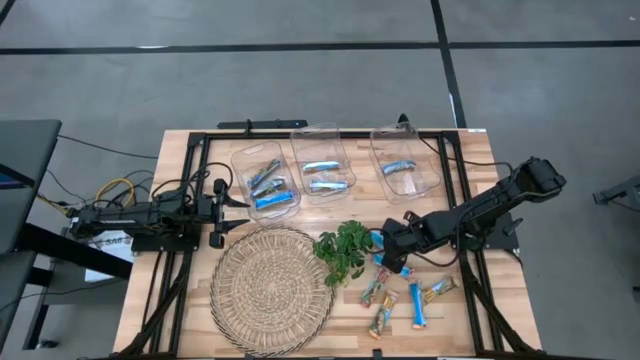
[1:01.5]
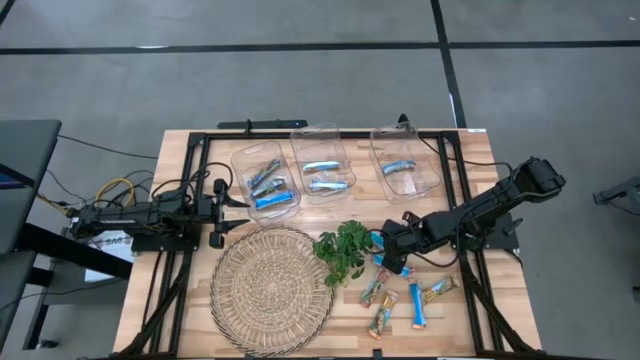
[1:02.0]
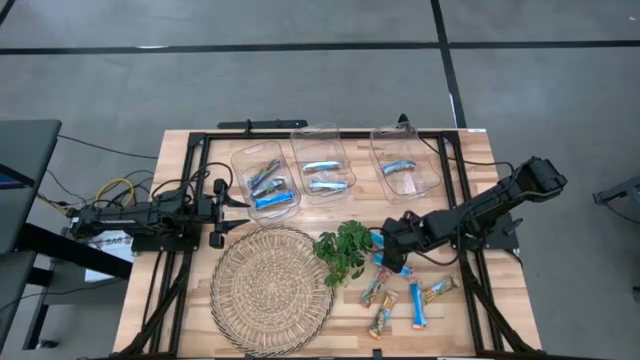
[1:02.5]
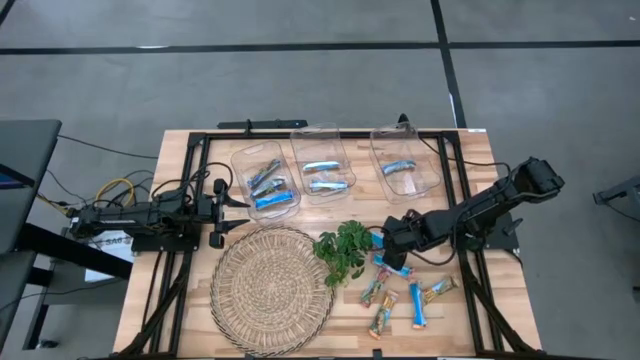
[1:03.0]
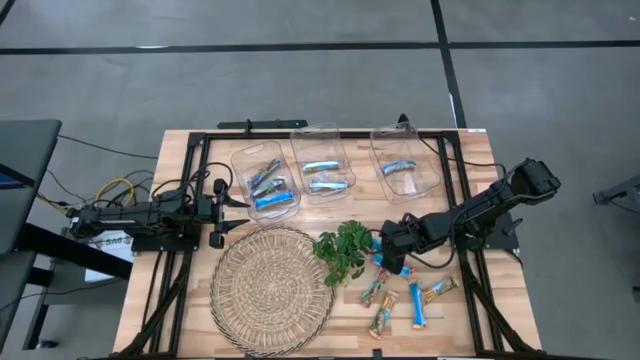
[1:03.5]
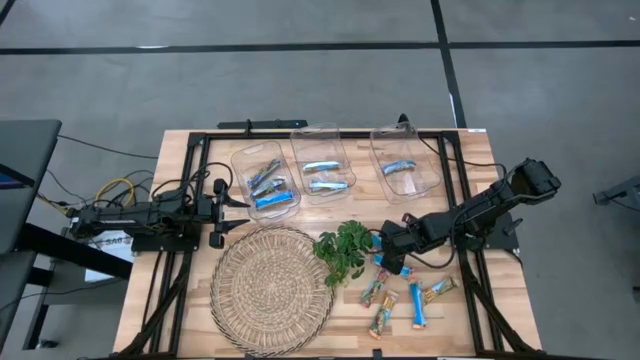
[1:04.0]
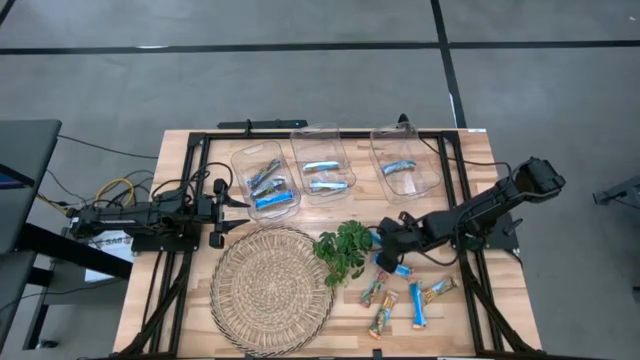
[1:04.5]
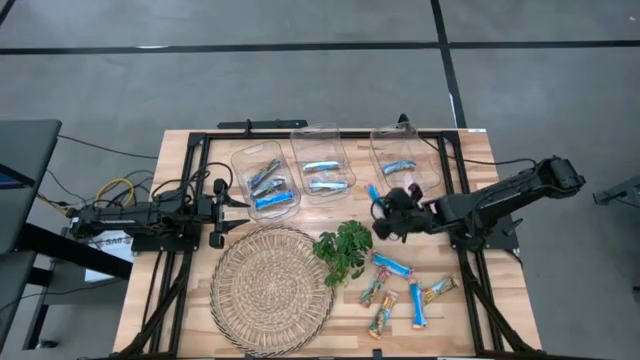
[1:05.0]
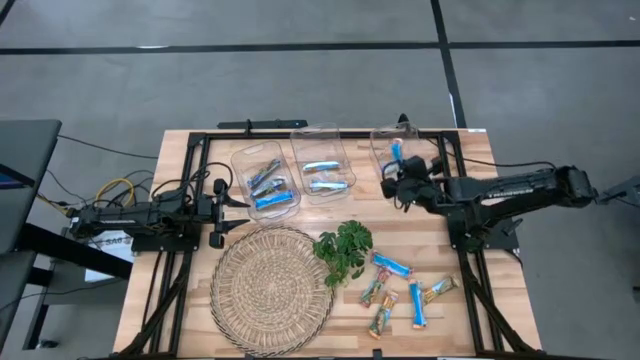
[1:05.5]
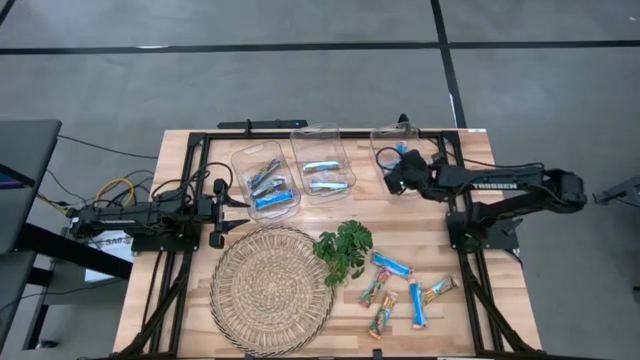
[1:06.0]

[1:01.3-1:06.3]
Task: Pick and place Granola Bars by type
Put the red granola bar into the right transparent bin

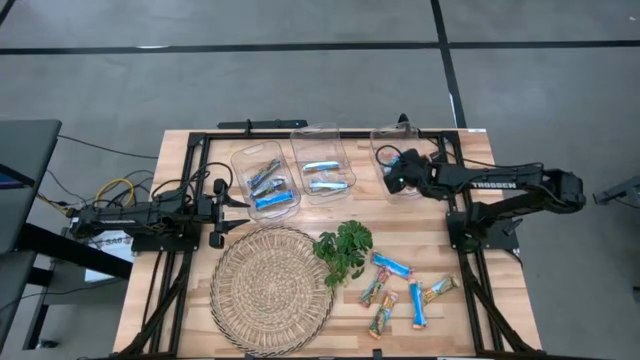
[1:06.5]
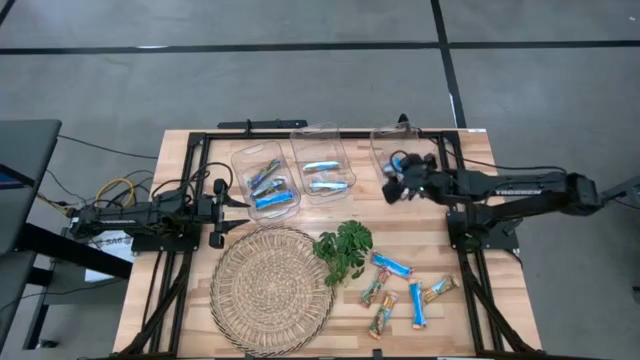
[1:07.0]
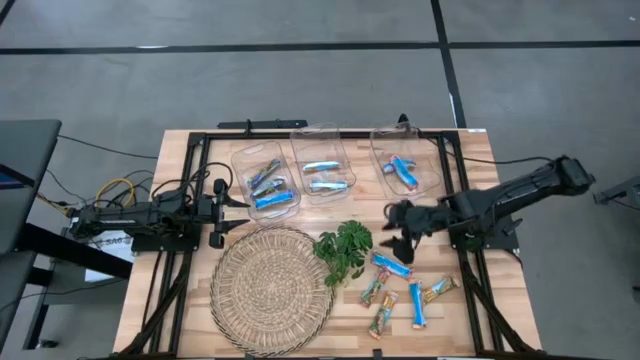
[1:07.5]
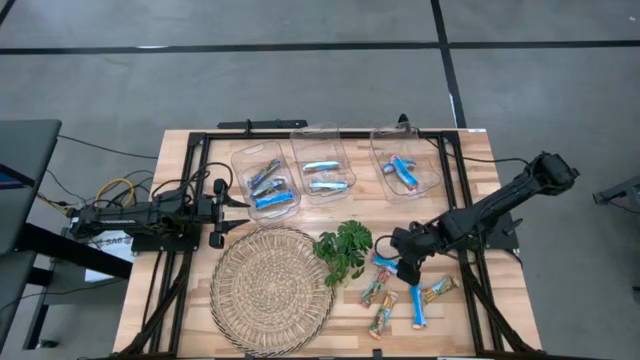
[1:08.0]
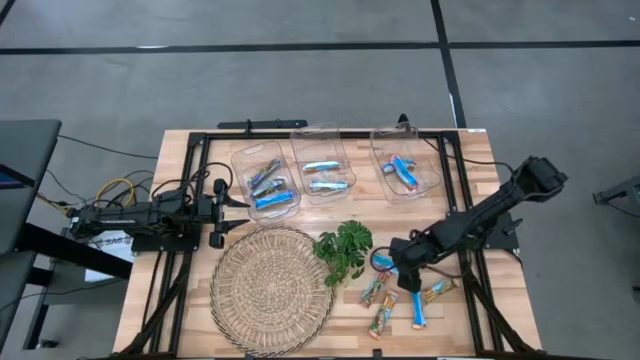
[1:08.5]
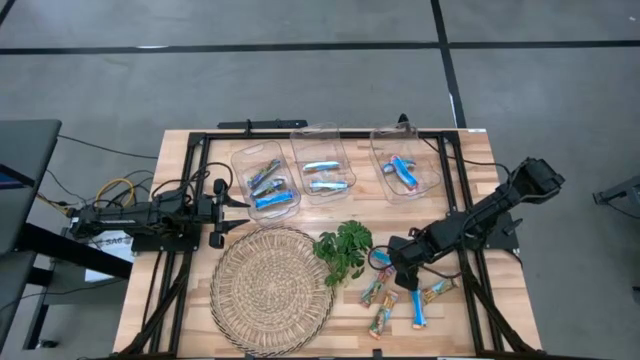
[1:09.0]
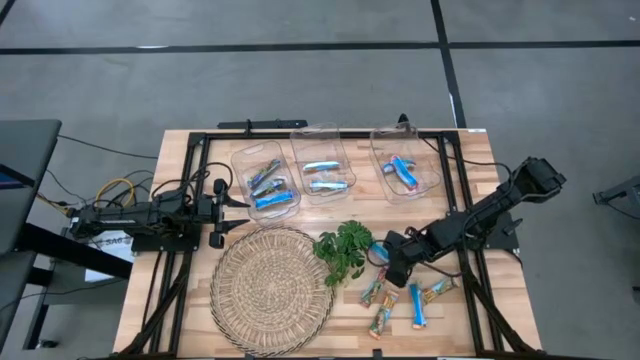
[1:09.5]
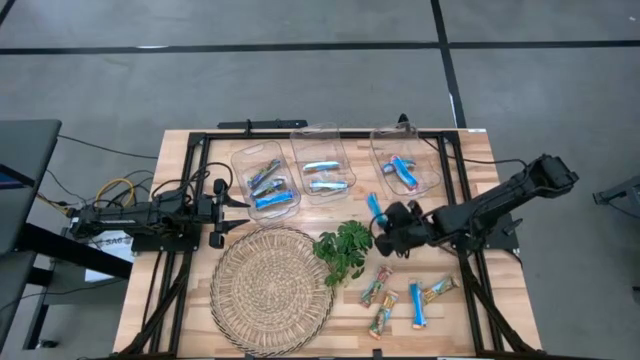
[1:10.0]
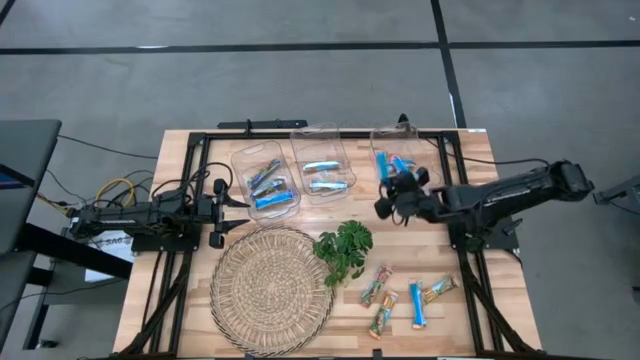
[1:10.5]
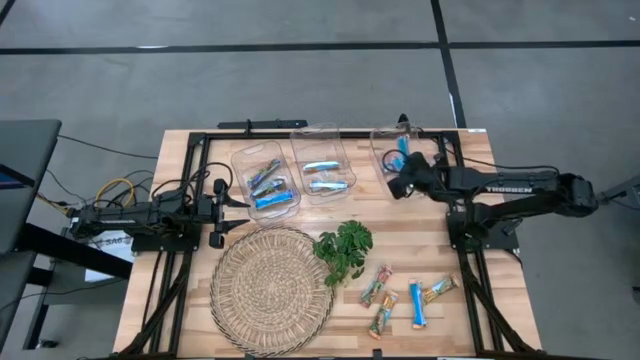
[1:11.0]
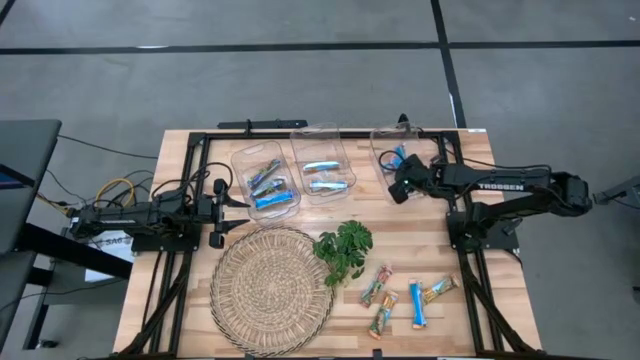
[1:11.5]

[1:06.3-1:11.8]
Put the red granola bar into the right transparent bin

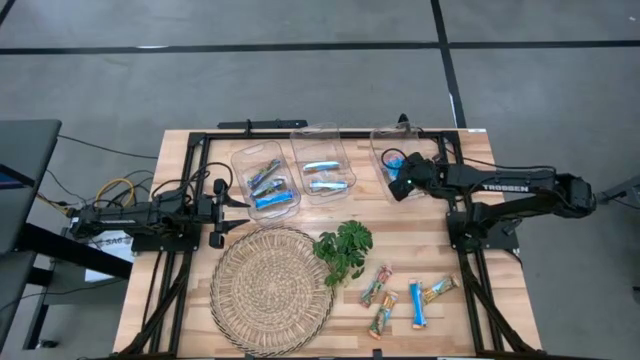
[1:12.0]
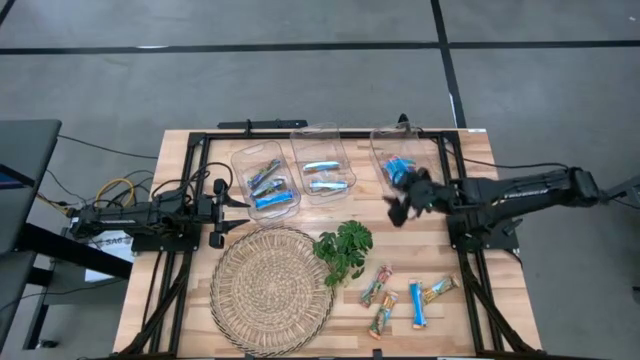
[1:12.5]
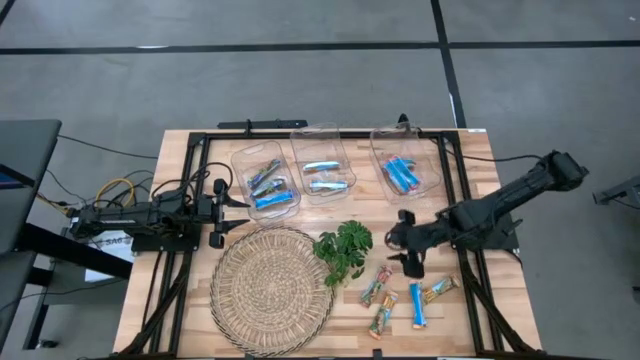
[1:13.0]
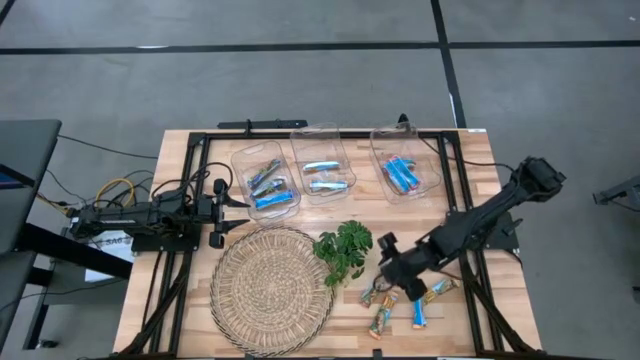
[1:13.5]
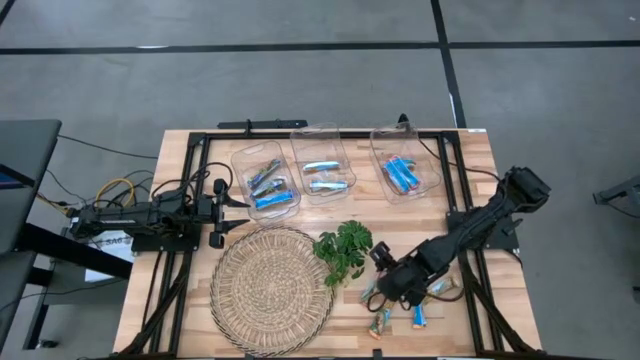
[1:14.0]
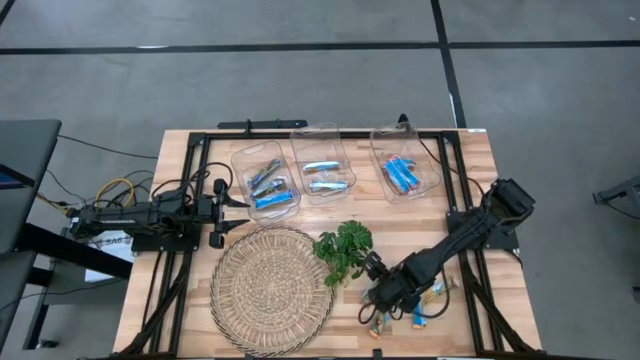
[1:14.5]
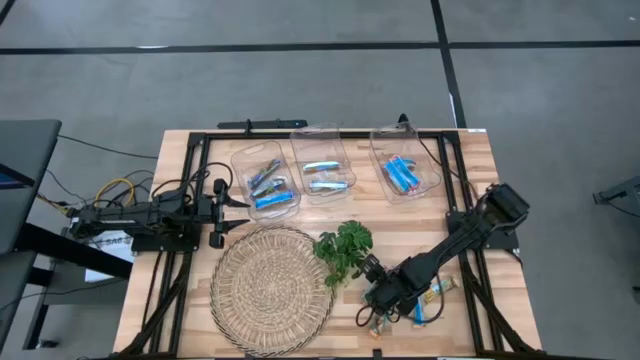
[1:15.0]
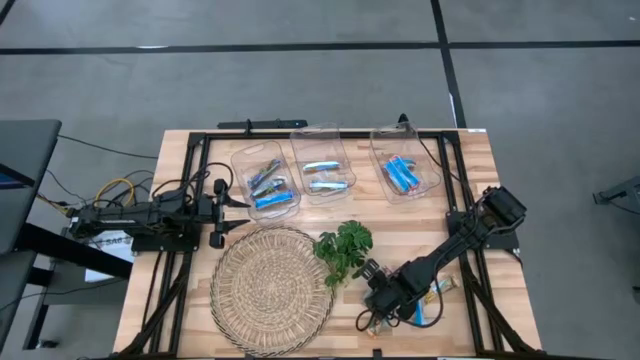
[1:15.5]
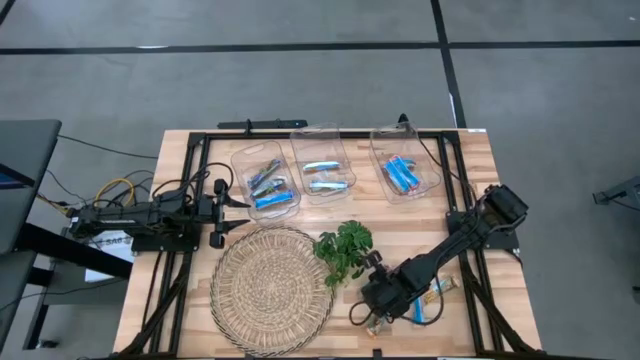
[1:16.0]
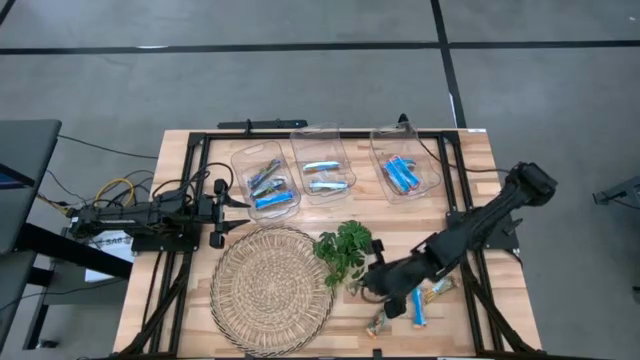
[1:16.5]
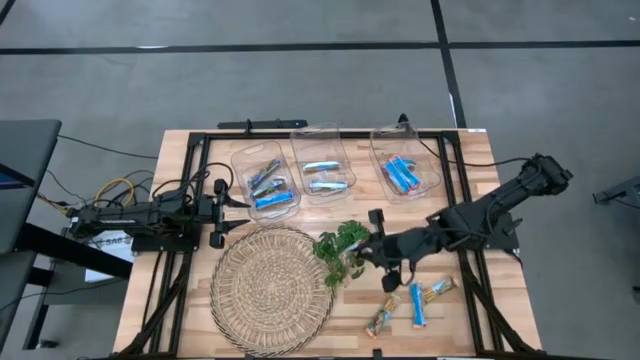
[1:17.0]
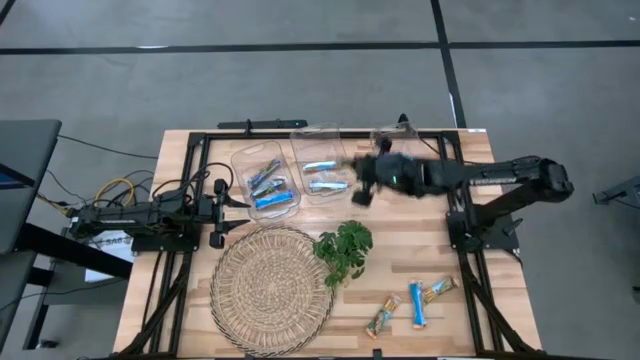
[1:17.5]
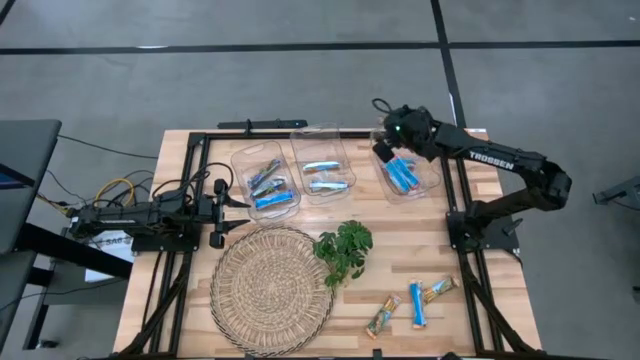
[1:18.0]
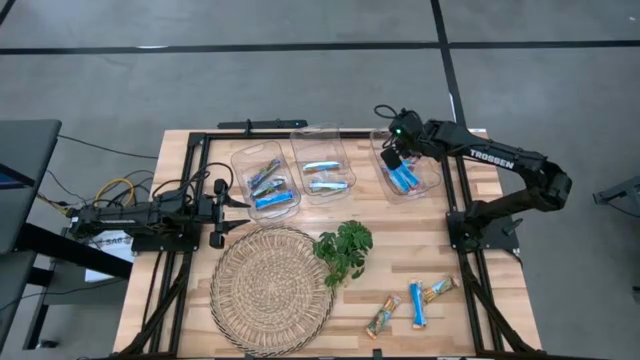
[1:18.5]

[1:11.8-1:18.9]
Put the red granola bar into the right transparent bin

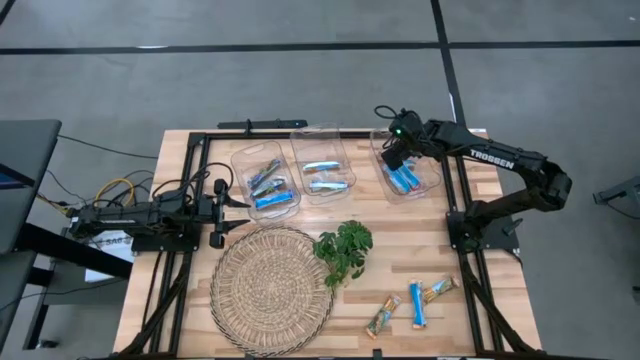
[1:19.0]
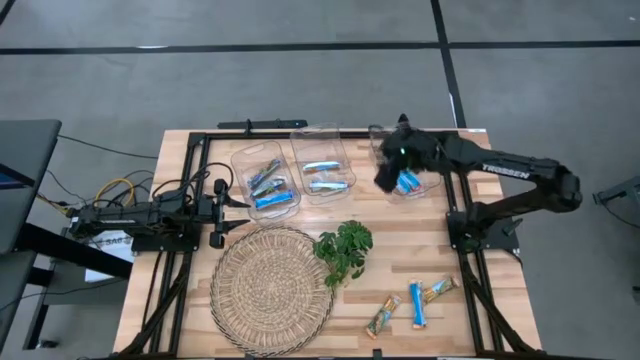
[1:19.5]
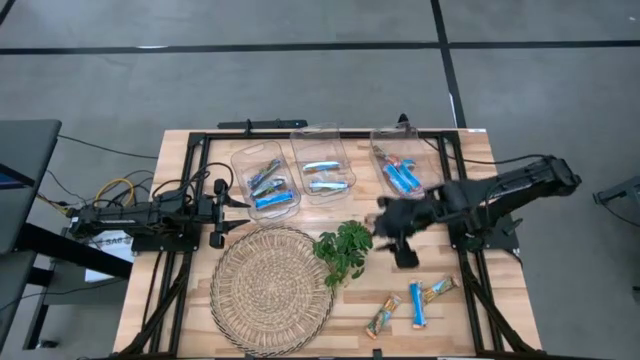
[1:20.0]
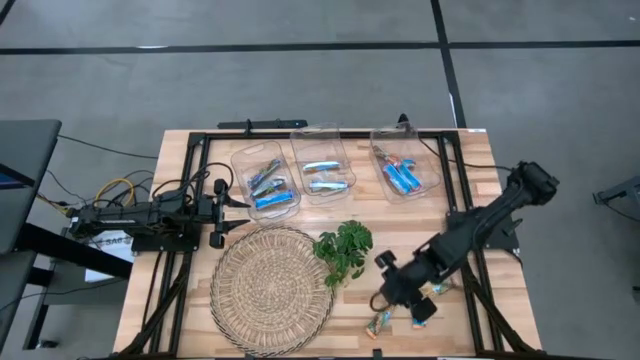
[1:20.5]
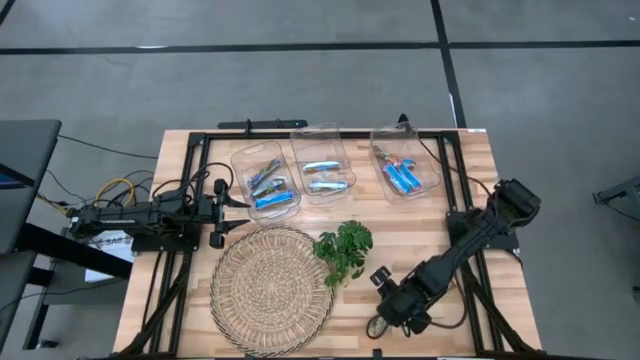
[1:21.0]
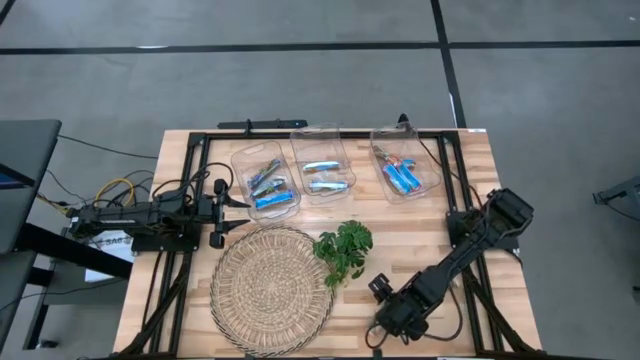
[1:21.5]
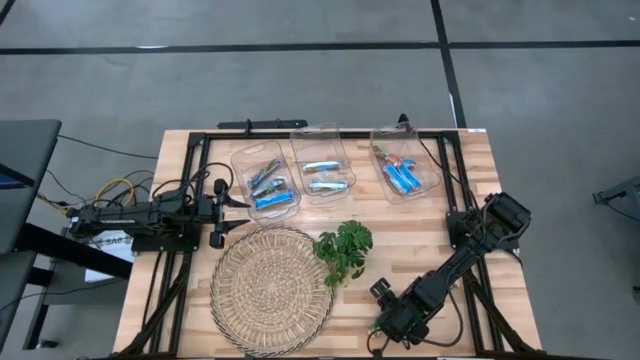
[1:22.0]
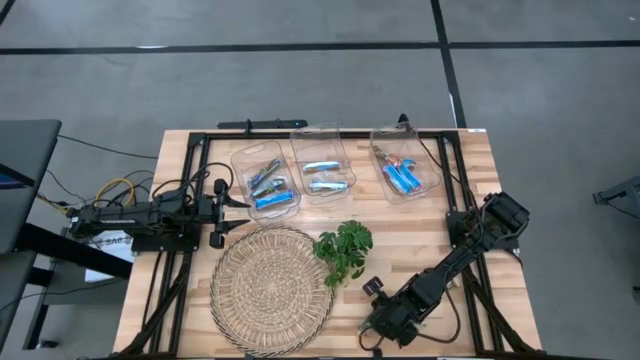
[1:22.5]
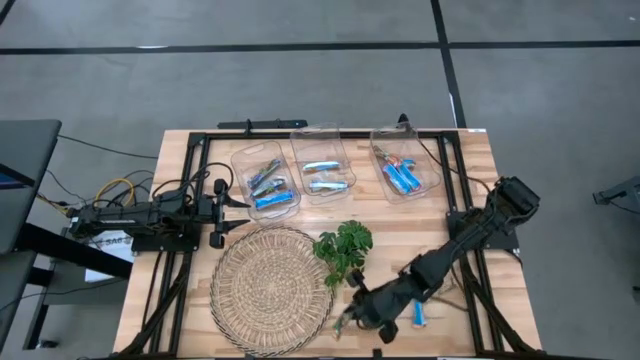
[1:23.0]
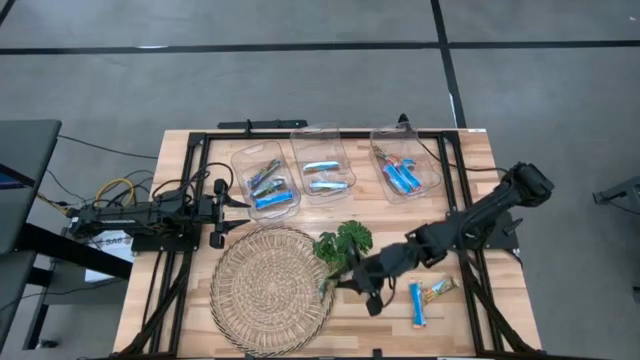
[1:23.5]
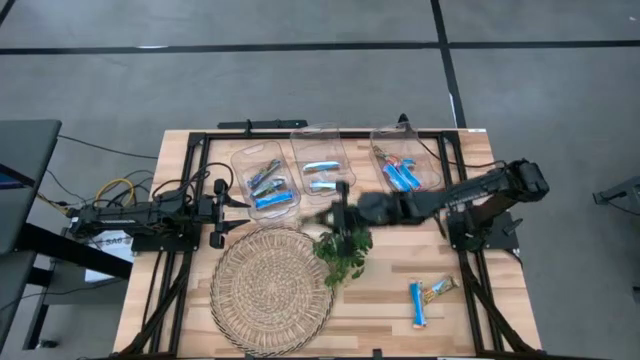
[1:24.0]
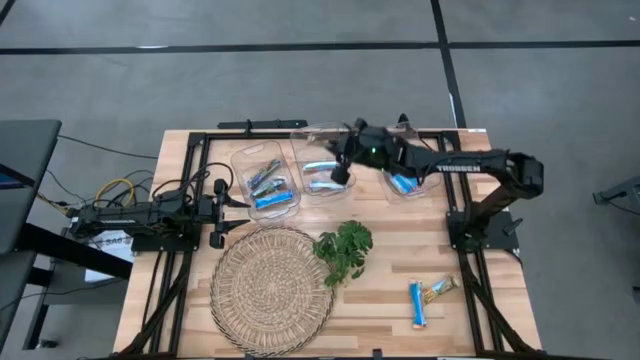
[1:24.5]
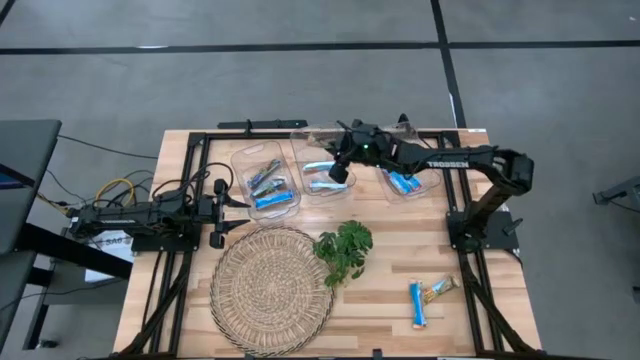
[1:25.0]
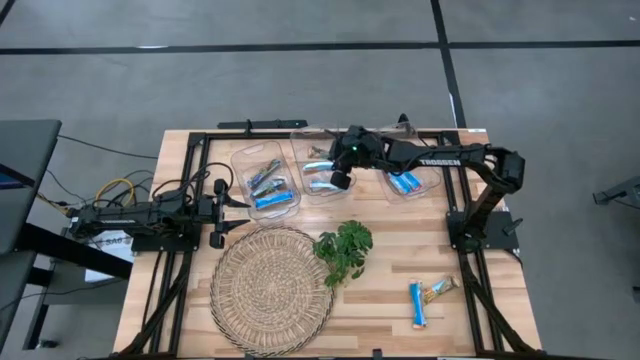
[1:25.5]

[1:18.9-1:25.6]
Put the yellow granola bar into the middle transparent bin
